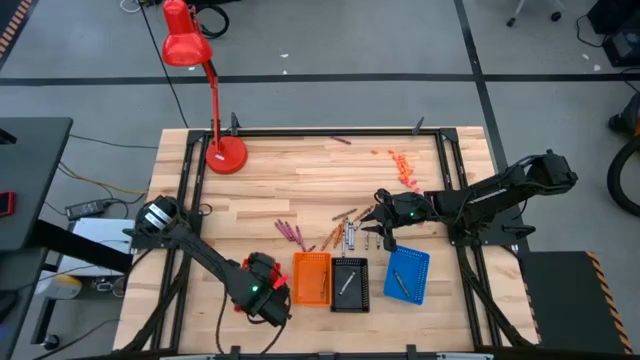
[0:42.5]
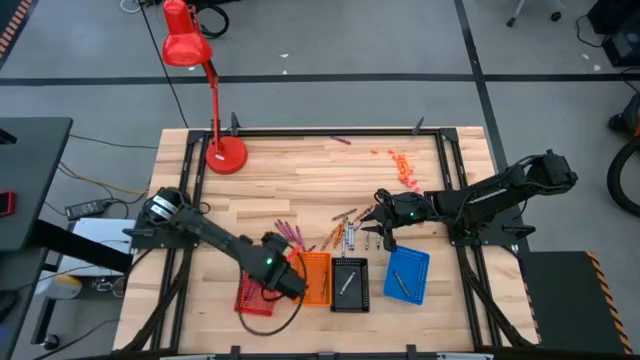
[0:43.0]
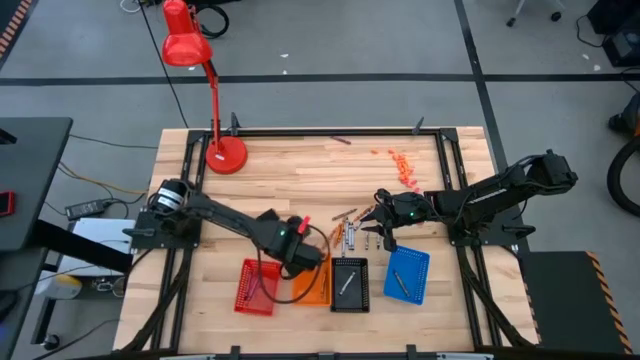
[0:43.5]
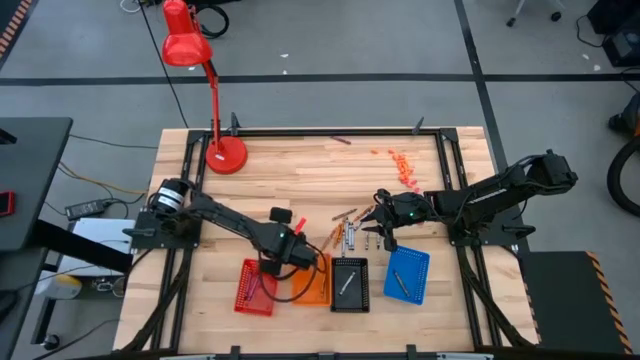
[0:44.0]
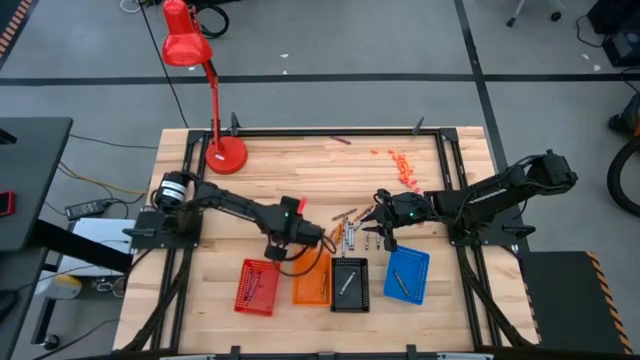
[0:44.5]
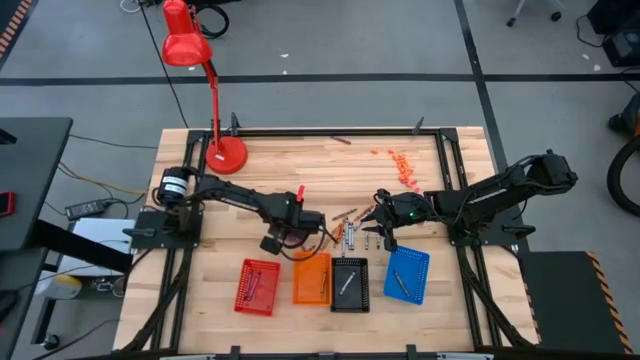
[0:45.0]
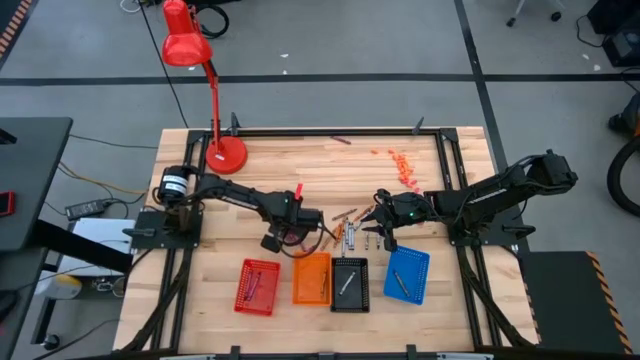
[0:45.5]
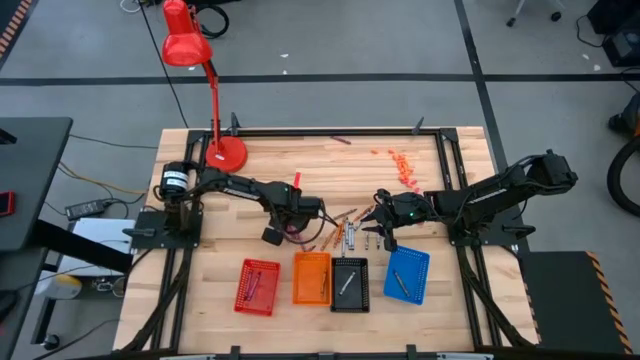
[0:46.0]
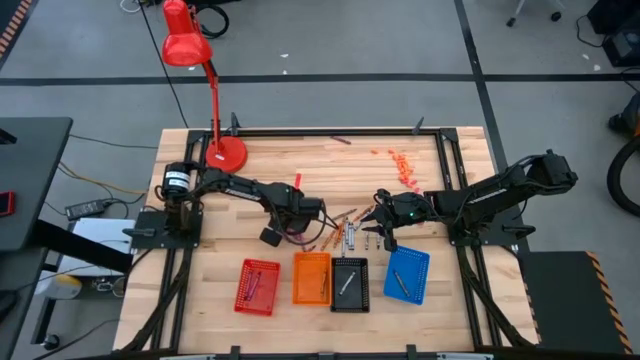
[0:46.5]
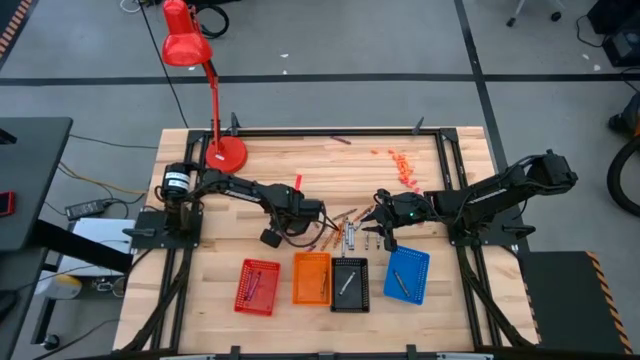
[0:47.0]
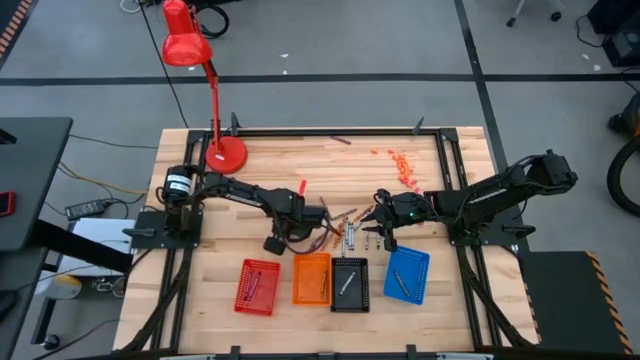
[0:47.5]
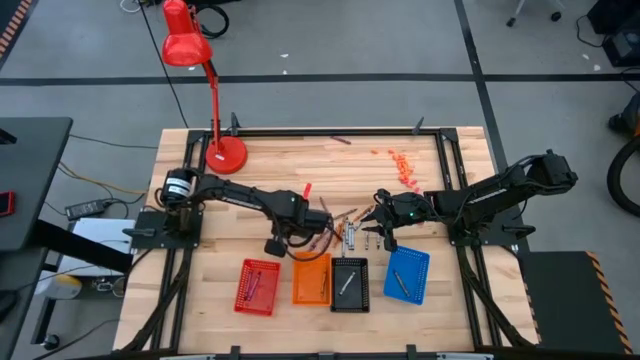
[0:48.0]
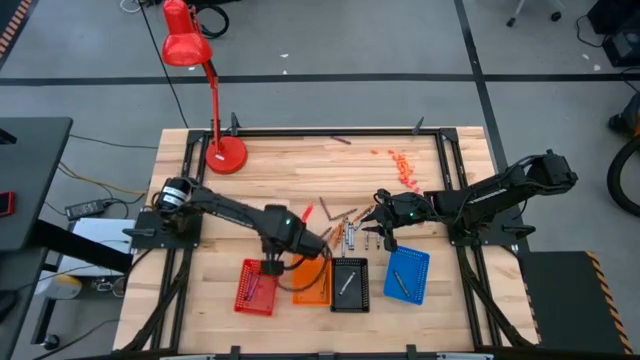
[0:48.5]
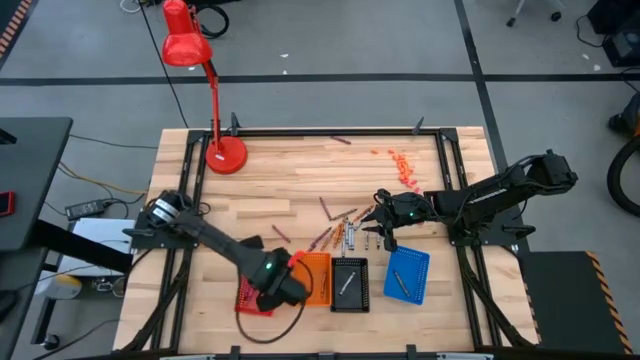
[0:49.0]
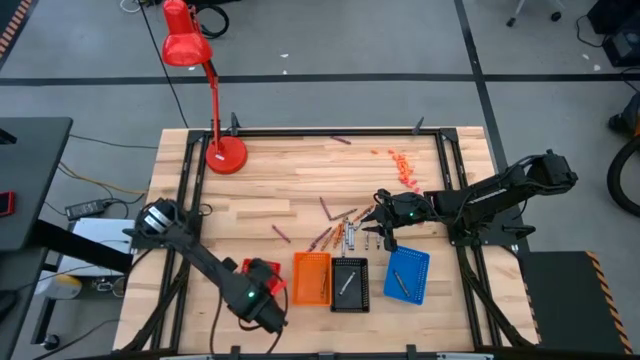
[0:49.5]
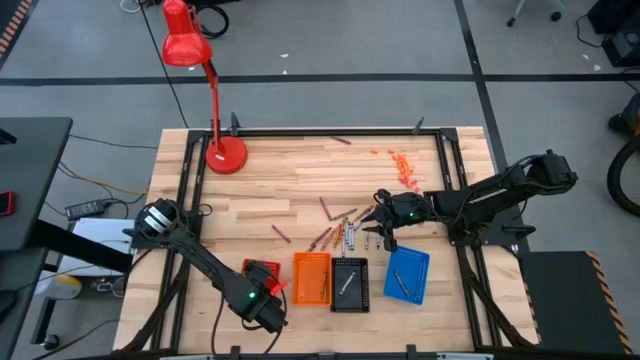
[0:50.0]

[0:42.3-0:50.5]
Task: Sort crayons
Put the violet crayon into the red bin

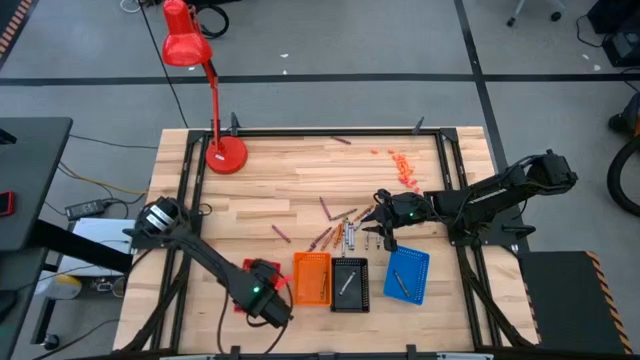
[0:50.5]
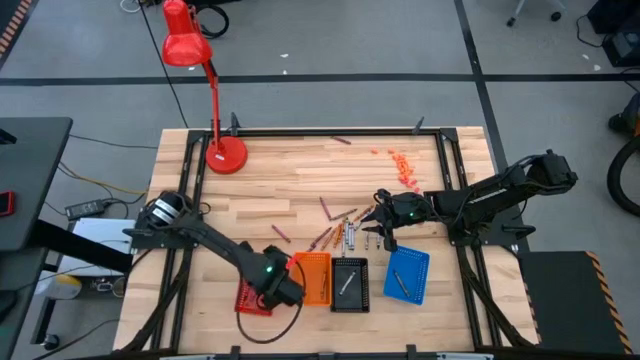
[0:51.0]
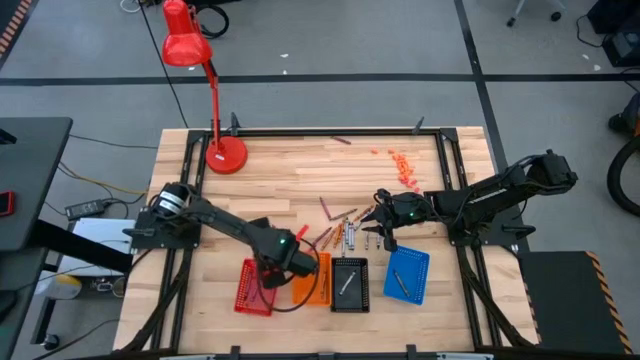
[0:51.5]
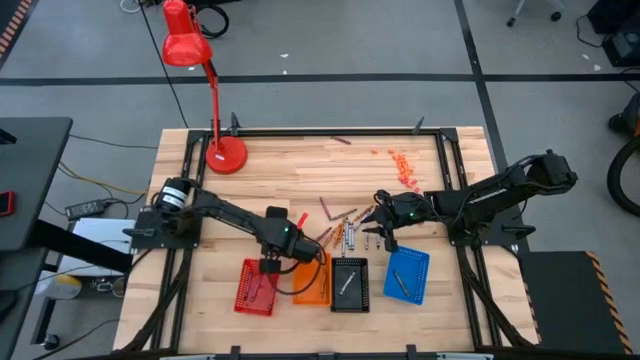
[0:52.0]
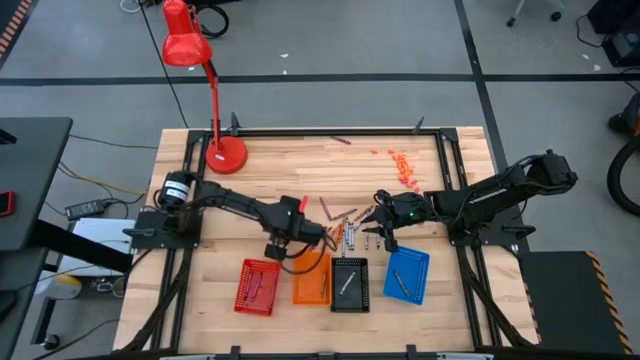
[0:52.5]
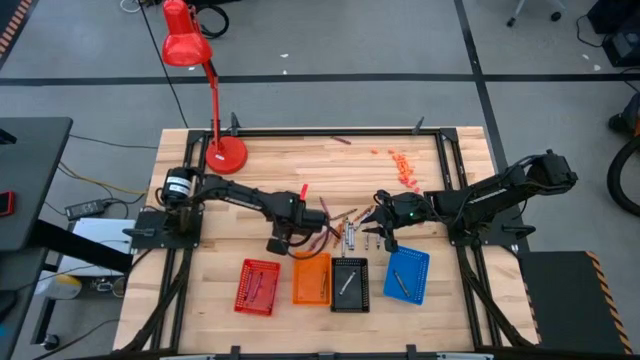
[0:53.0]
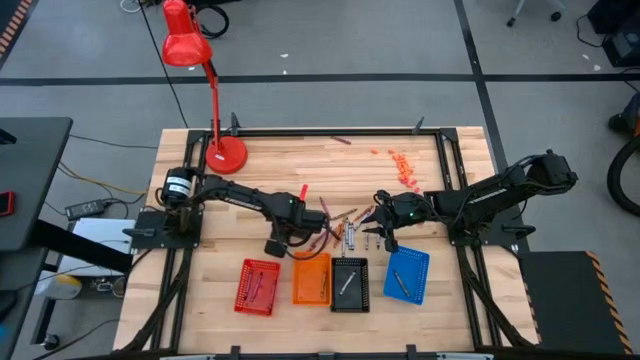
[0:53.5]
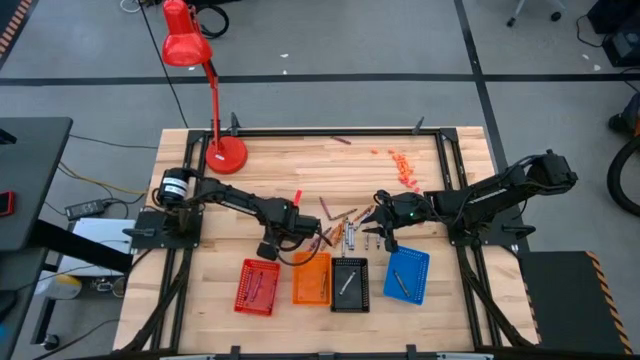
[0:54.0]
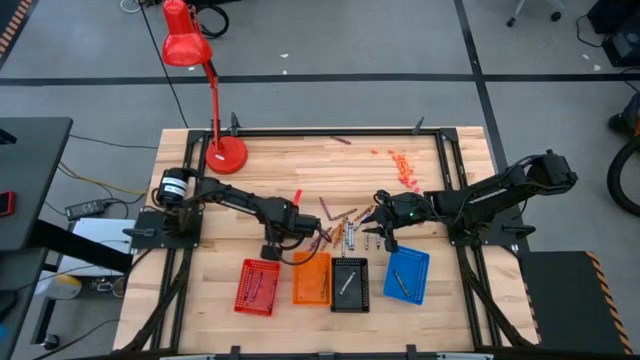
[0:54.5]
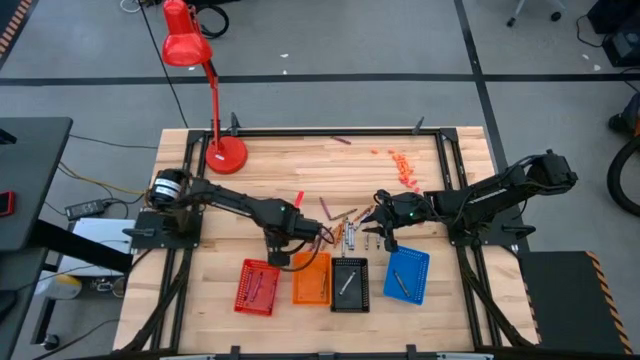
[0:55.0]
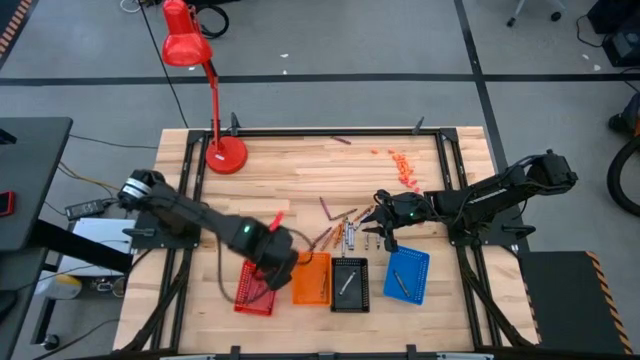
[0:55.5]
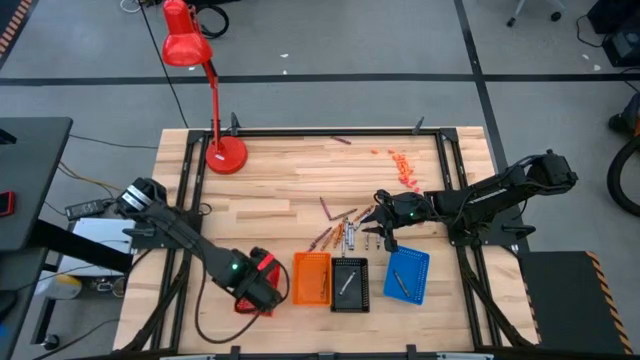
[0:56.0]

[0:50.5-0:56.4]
Put the violet crayon into the red bin

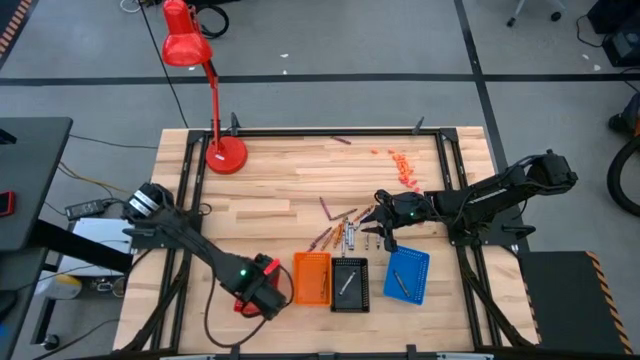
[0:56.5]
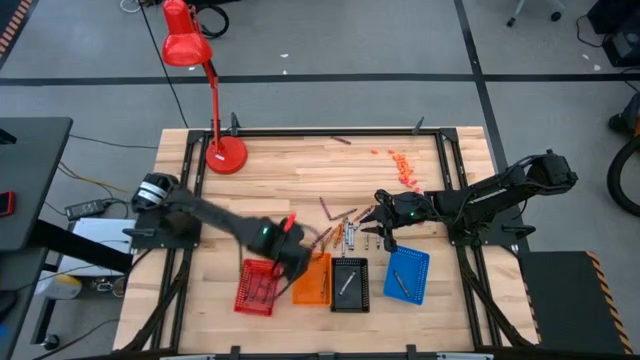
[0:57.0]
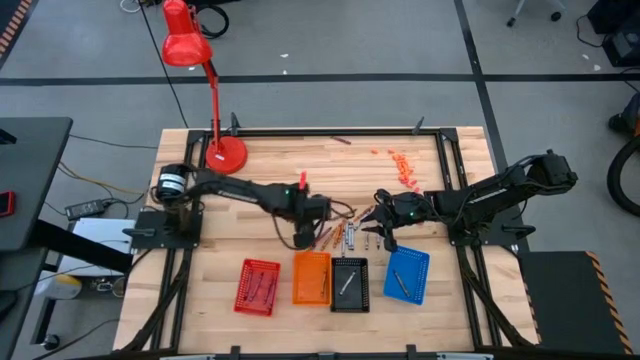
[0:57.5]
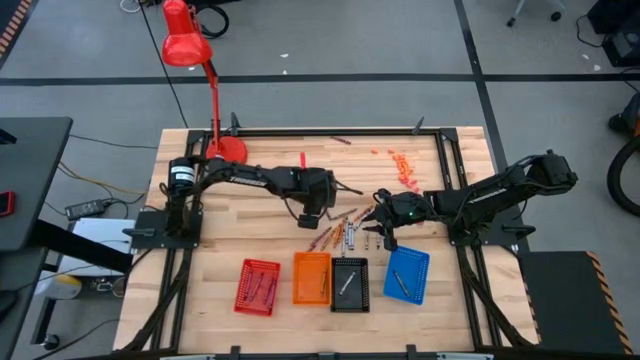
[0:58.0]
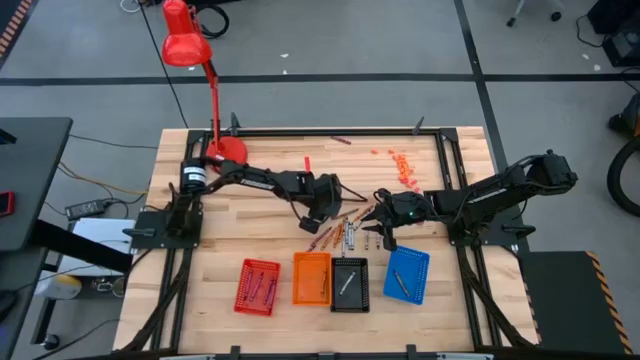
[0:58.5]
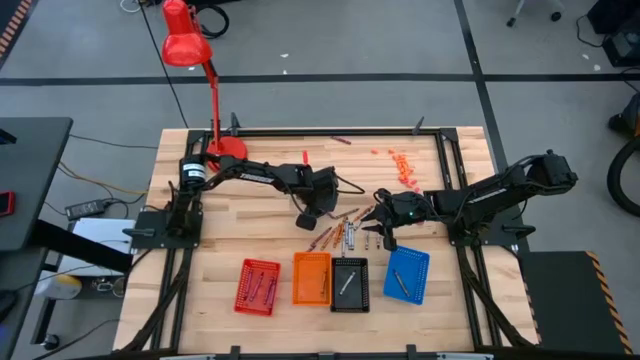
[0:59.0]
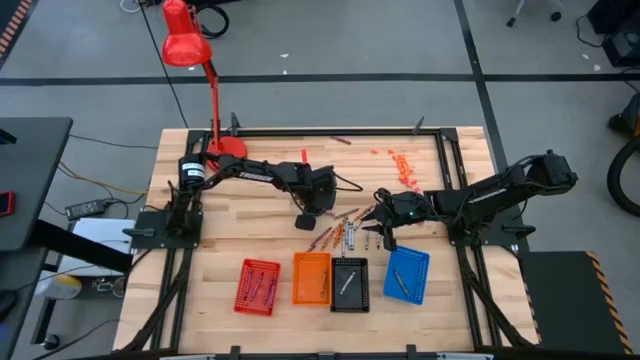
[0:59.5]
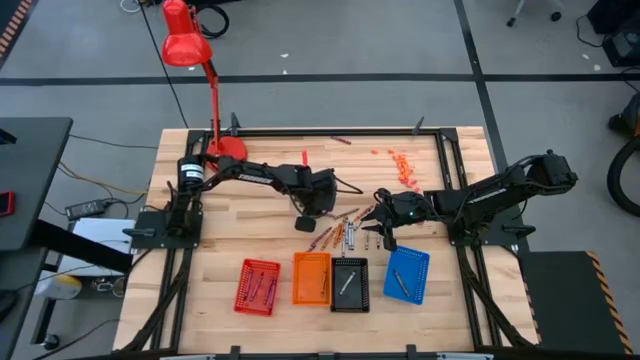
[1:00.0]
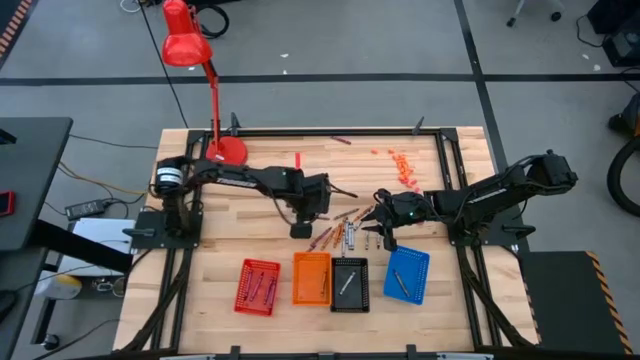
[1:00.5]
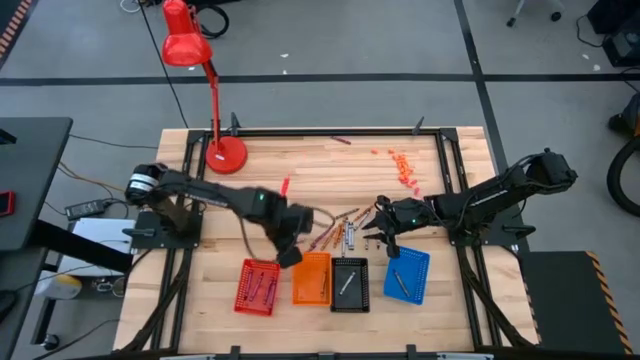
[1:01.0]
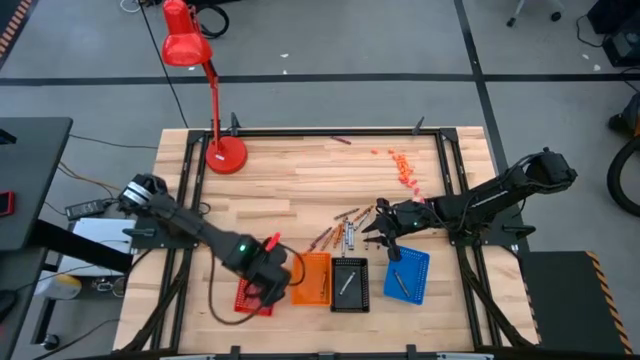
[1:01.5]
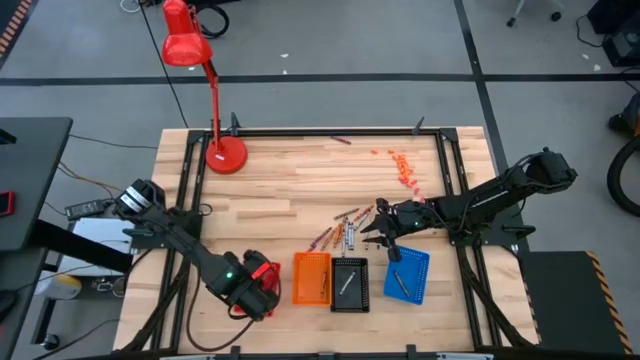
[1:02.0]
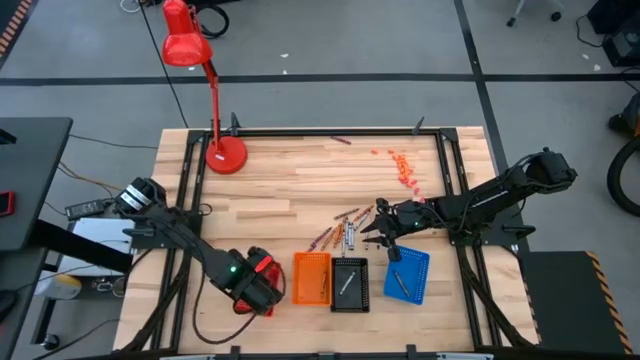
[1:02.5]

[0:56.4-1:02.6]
Put the violet crayon into the red bin

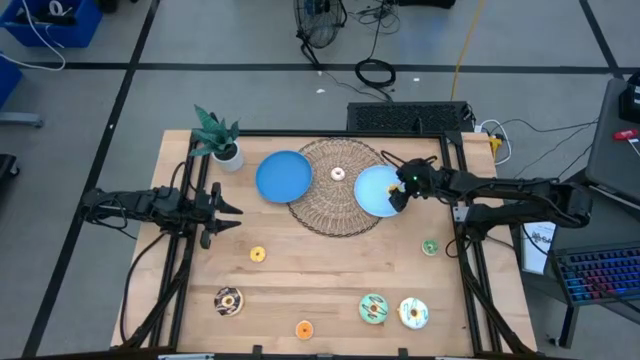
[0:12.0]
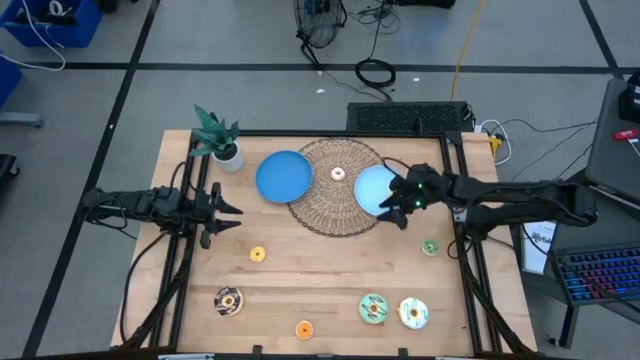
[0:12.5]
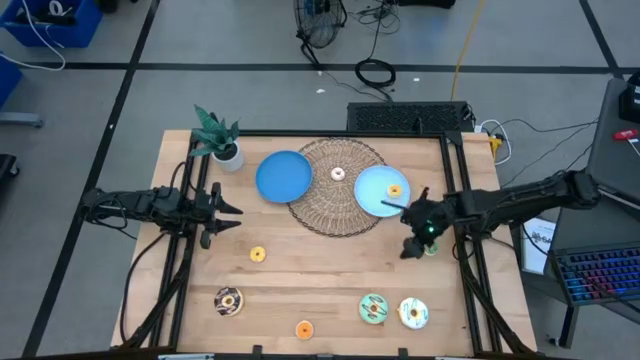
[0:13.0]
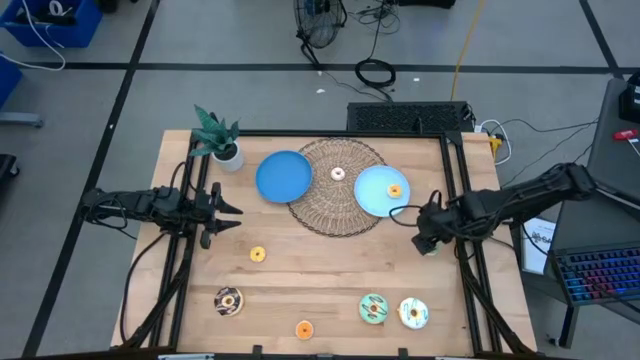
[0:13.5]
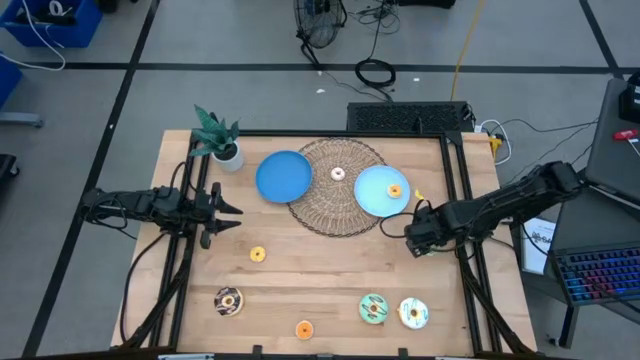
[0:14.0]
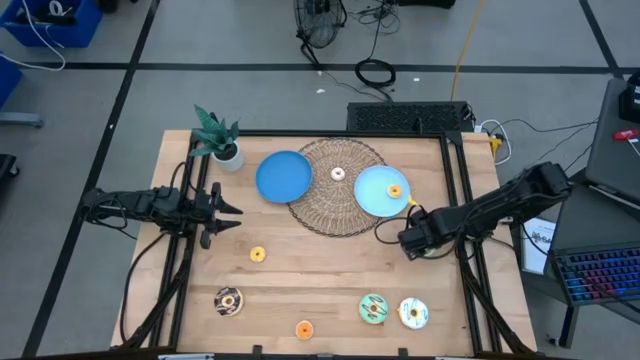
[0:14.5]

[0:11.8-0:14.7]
Task: Pick & Place donuts
Put the small green donut on the light blue plate
